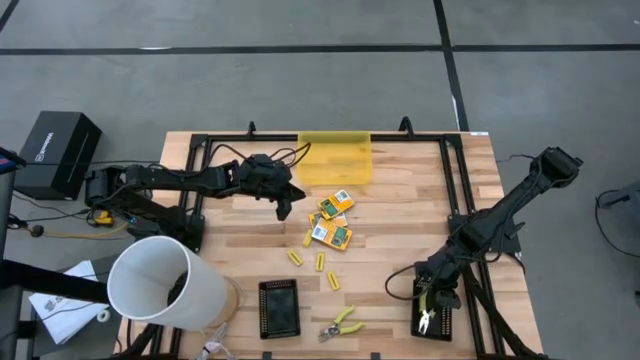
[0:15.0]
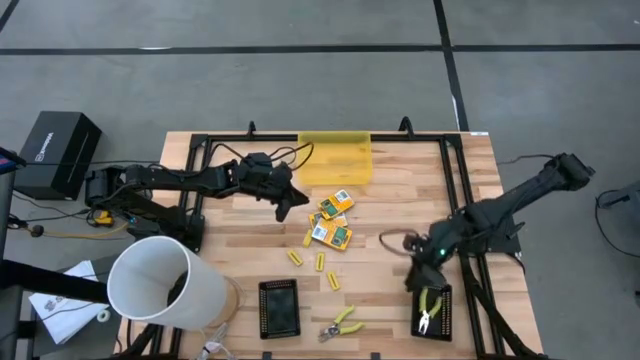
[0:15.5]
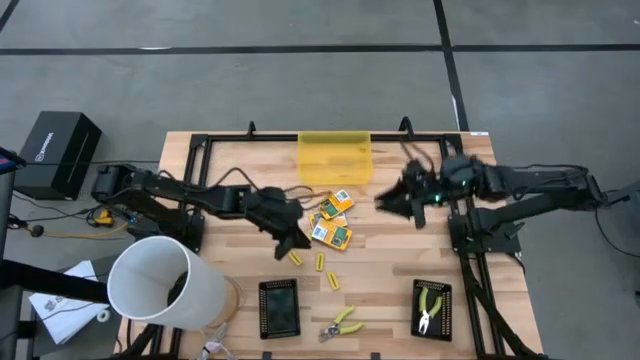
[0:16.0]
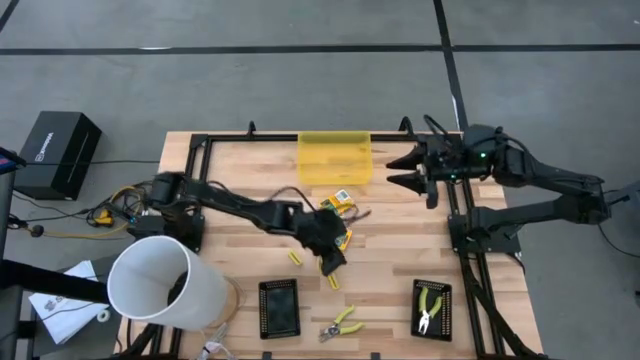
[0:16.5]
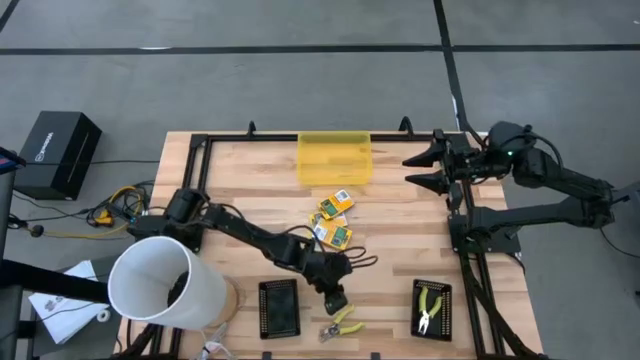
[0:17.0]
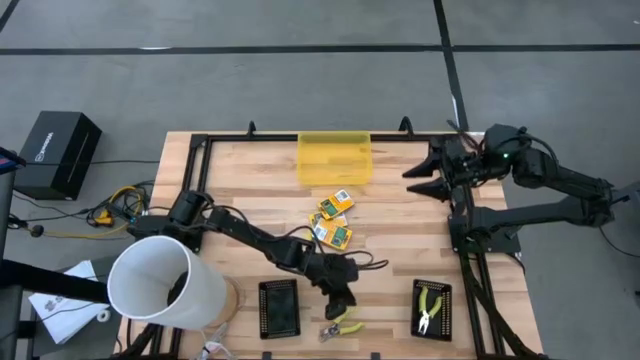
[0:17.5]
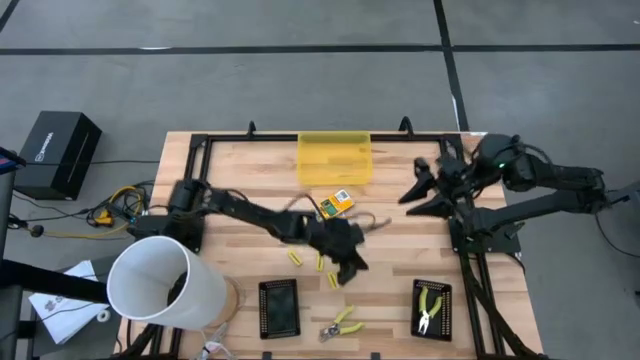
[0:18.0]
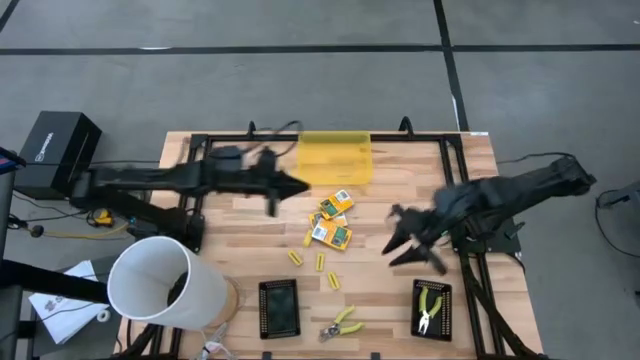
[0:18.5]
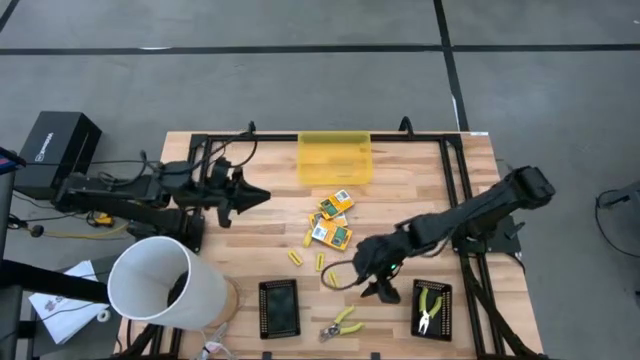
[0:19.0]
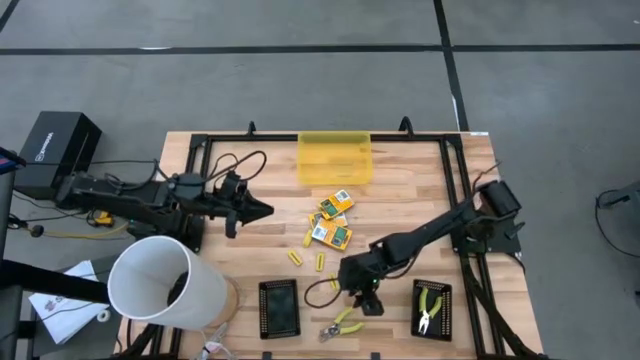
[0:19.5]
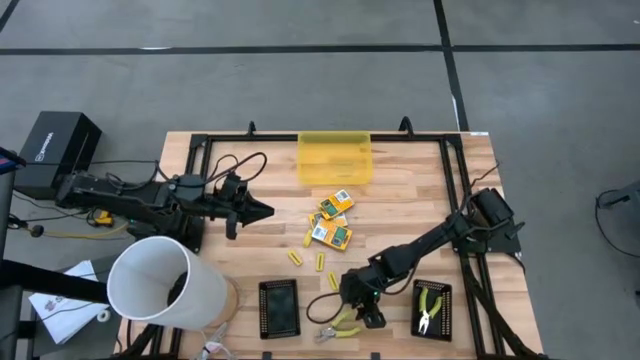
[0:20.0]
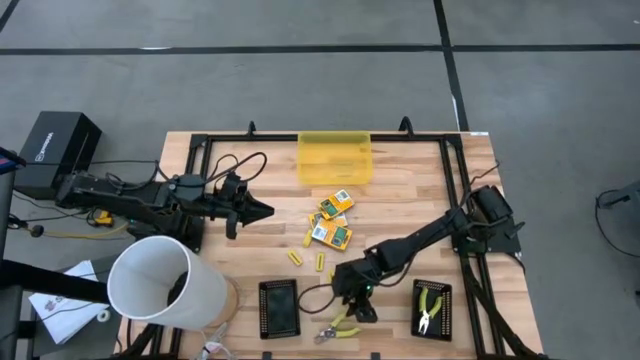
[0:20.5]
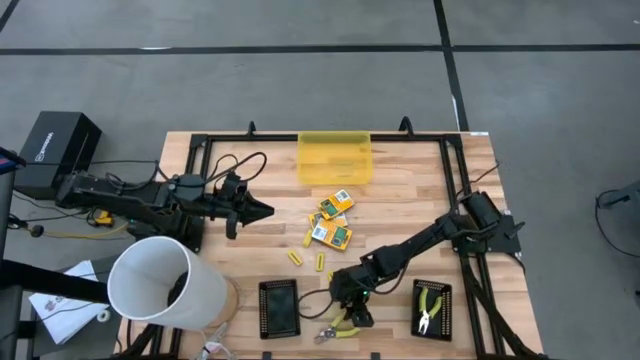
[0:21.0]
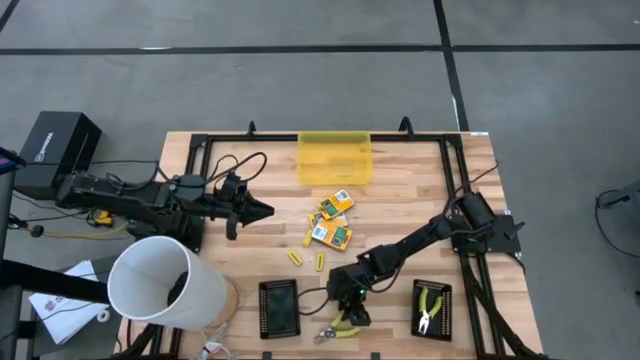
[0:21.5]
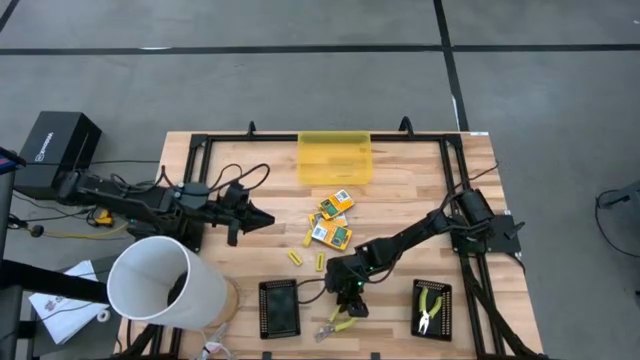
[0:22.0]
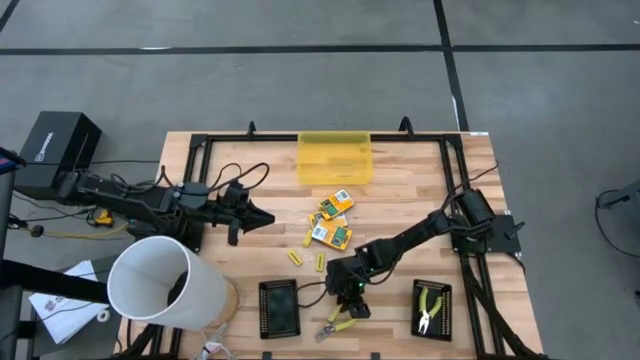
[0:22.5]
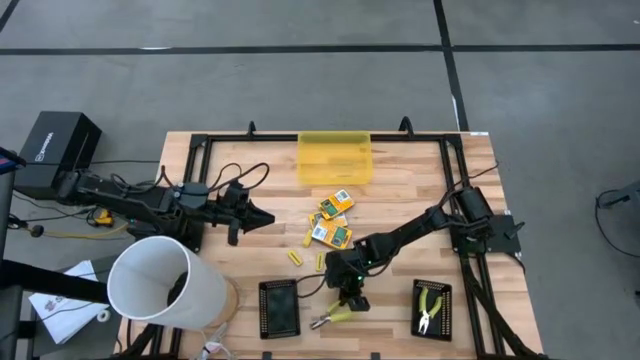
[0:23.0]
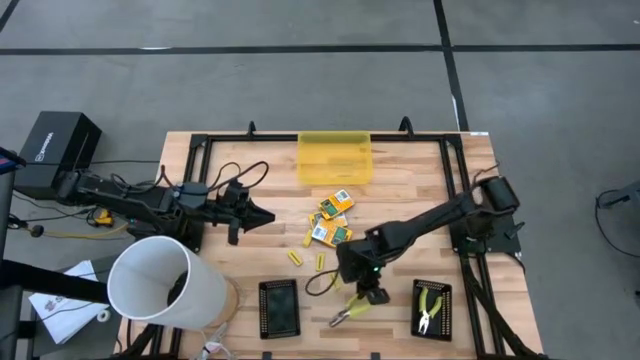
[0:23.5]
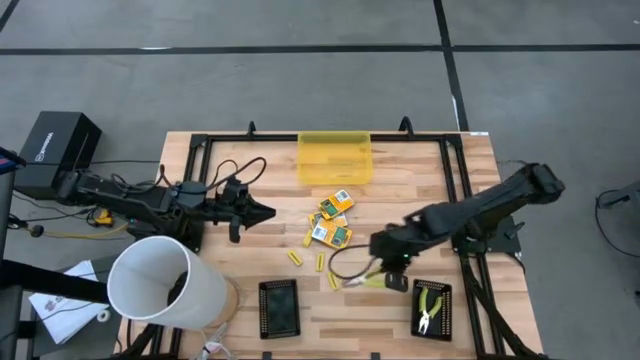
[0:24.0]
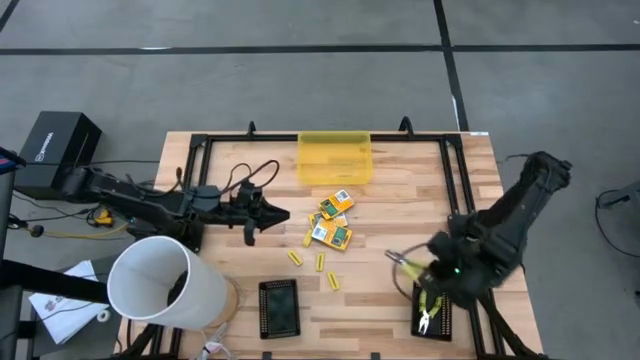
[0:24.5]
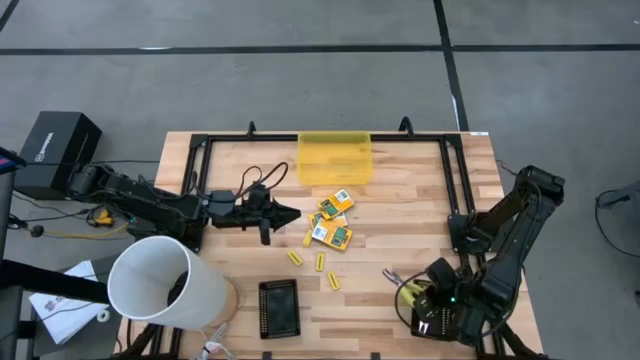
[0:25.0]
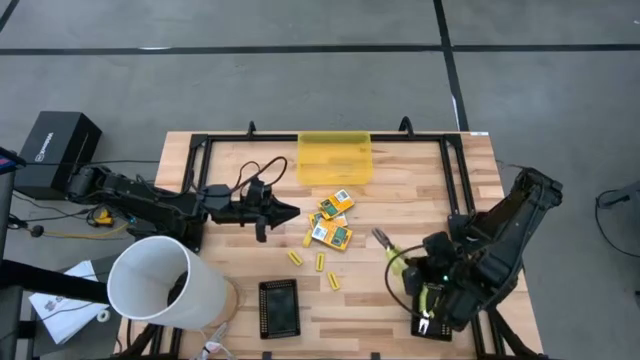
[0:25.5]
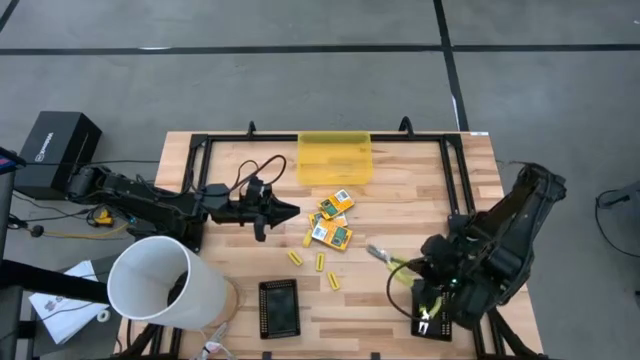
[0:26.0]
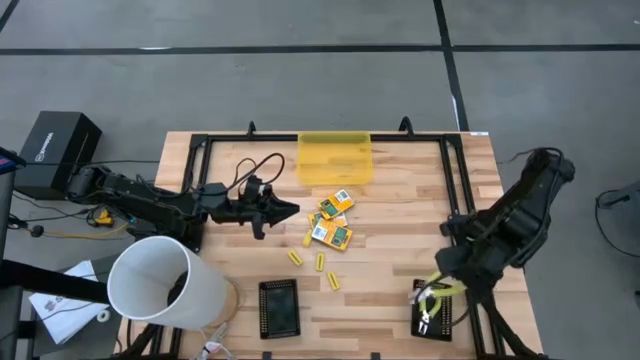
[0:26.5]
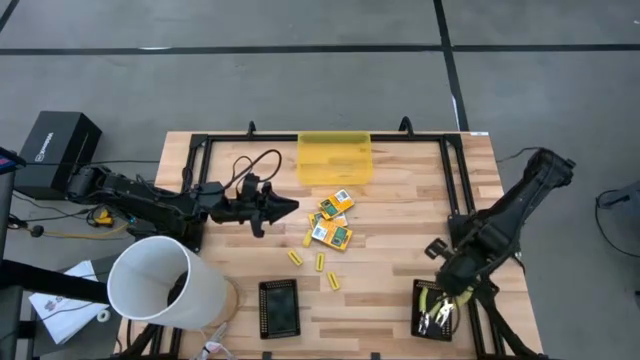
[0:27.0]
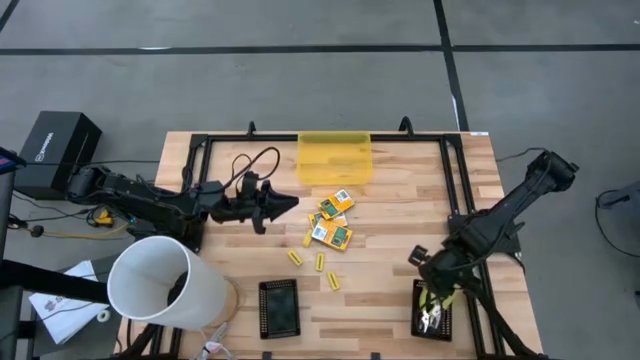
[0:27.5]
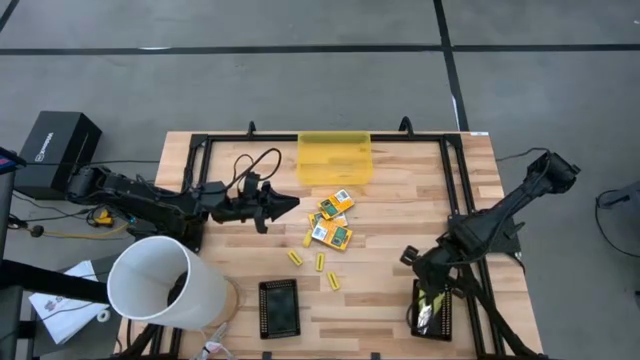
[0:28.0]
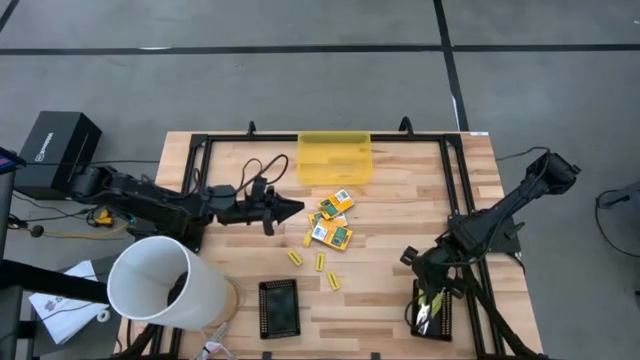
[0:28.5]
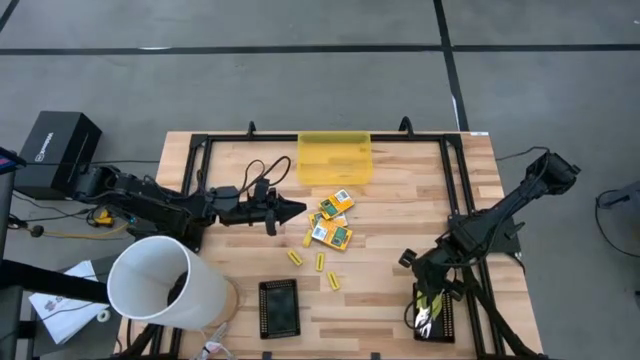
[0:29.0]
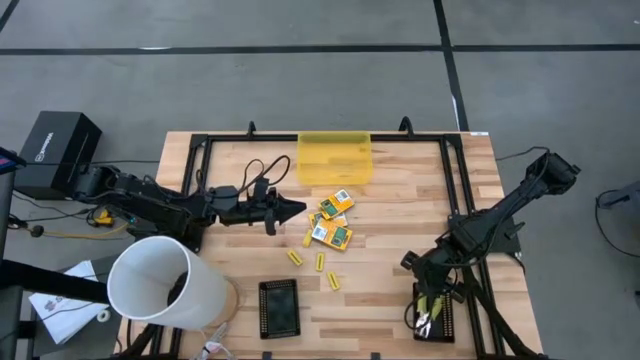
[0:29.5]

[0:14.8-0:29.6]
Task: Pick & Place School Supplies
Put the green hole puncher into the right black bin

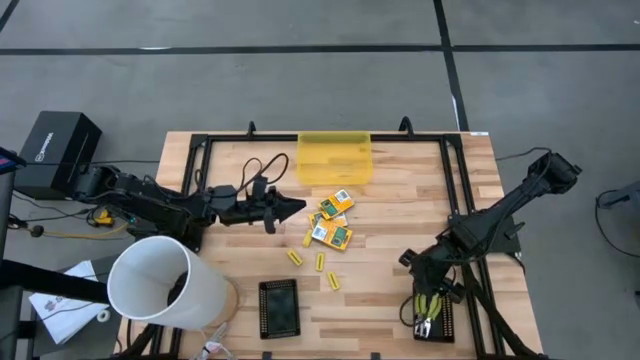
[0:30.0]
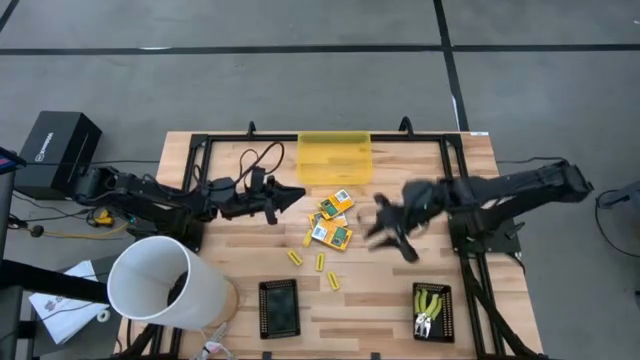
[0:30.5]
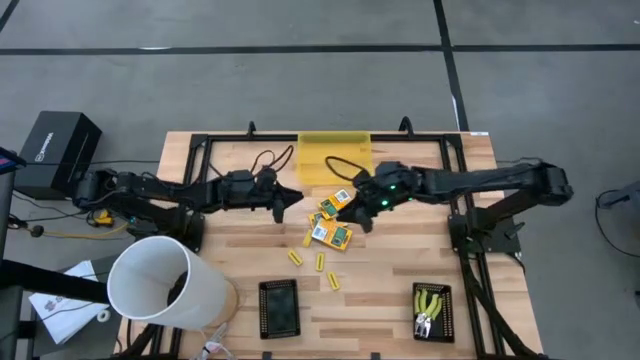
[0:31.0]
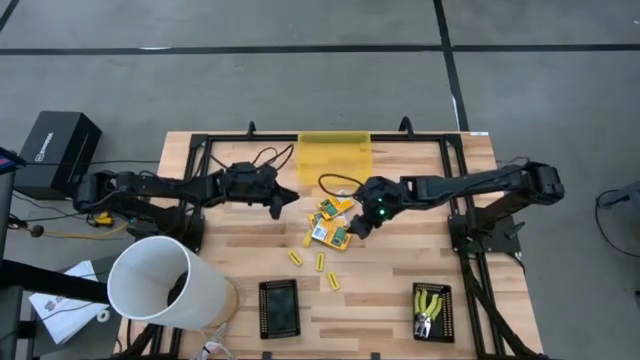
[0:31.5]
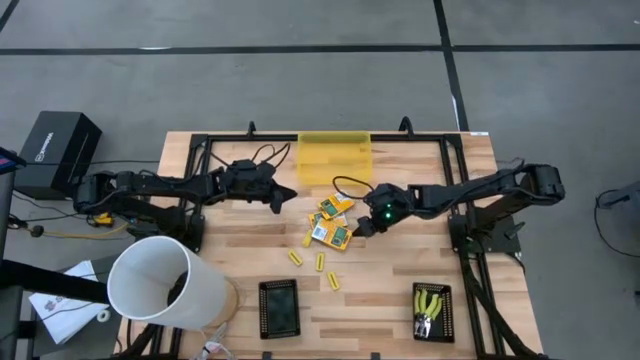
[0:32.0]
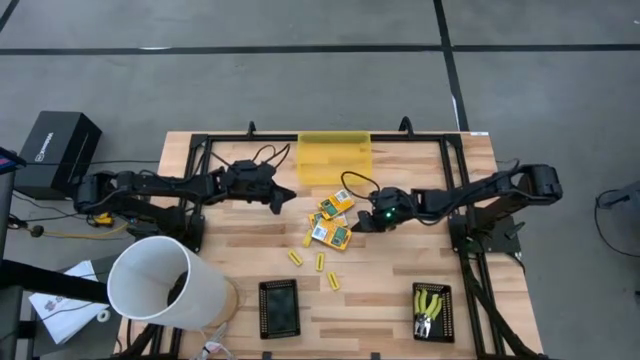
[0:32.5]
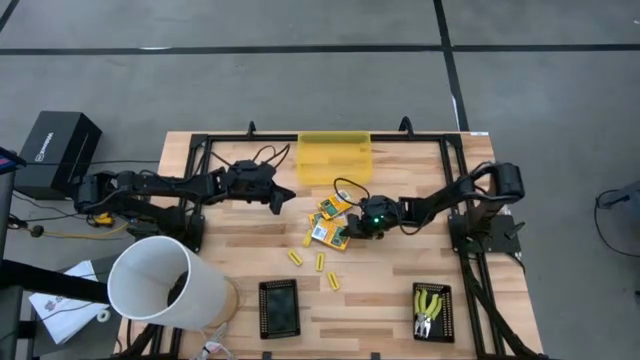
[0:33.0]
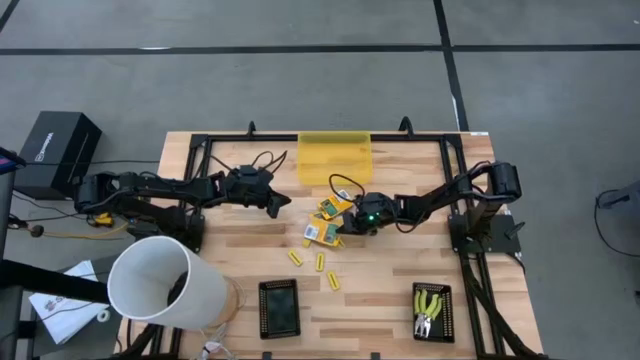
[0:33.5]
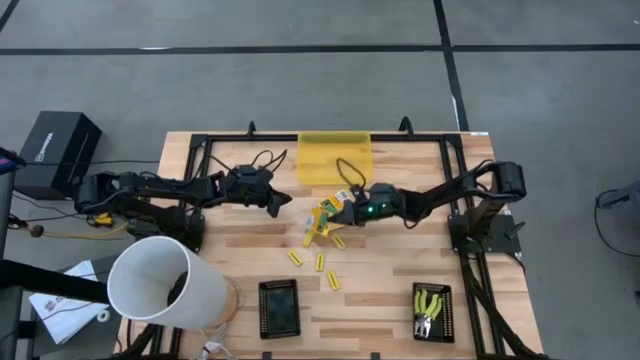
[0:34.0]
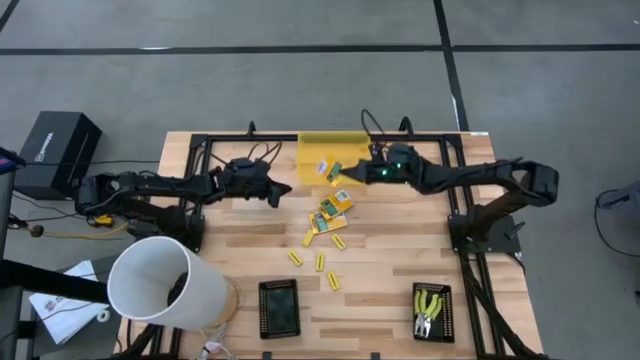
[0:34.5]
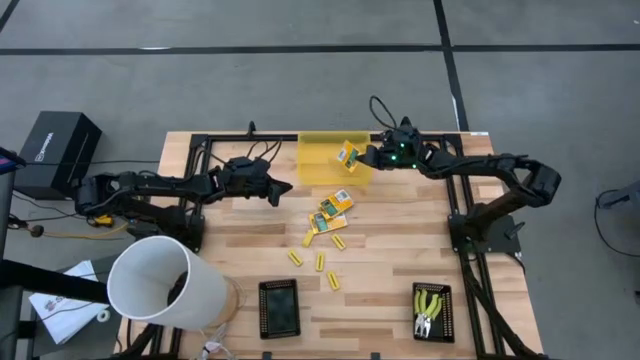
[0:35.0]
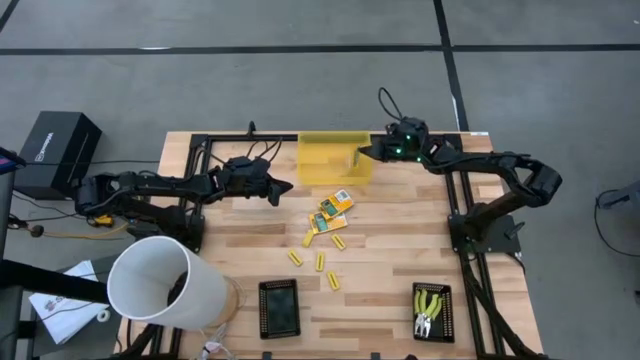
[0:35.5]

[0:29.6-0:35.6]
Put the yellow crayon box into the yellow bin

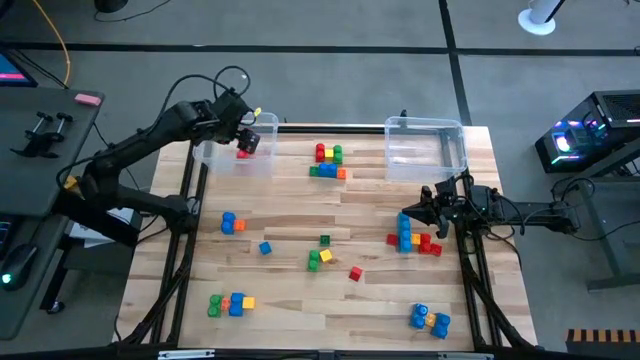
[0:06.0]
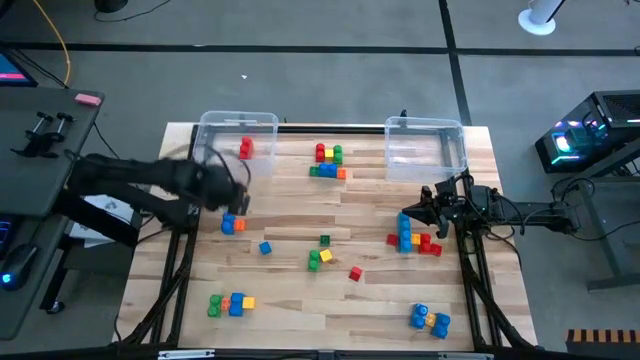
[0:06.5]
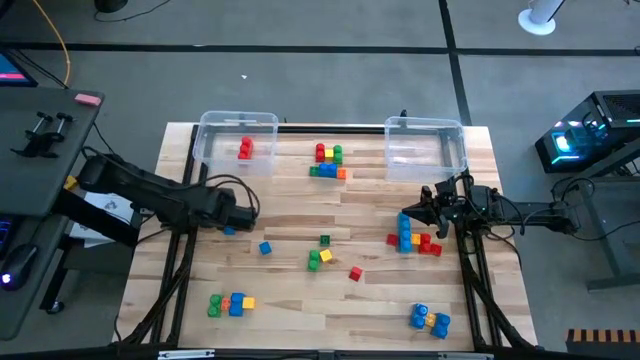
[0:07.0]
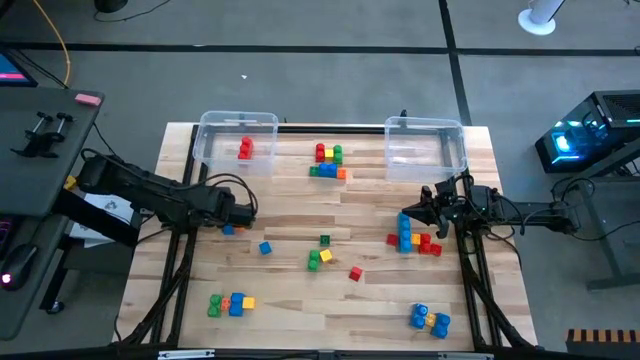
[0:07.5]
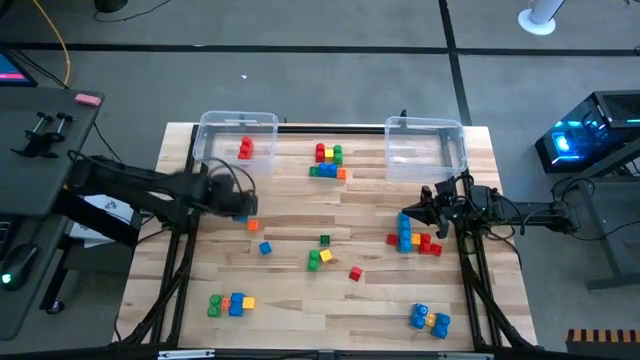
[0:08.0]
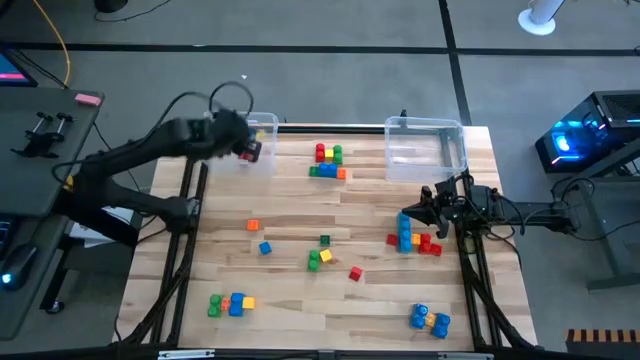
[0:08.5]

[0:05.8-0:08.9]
Task: Sort blocks by size
Put the large game piece into the left transparent bin
